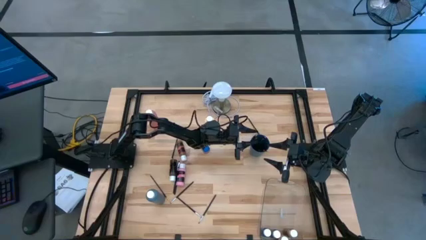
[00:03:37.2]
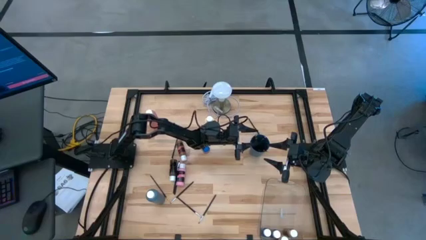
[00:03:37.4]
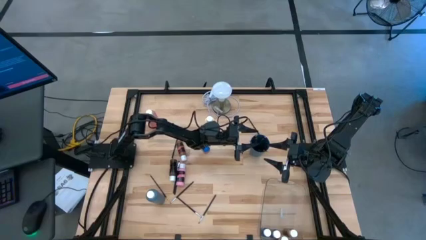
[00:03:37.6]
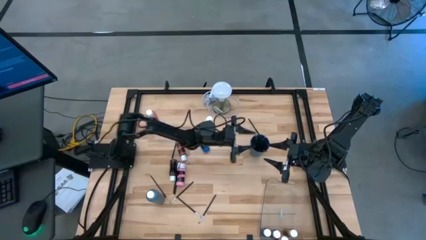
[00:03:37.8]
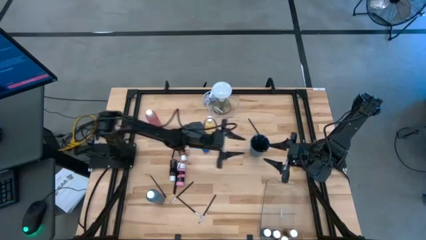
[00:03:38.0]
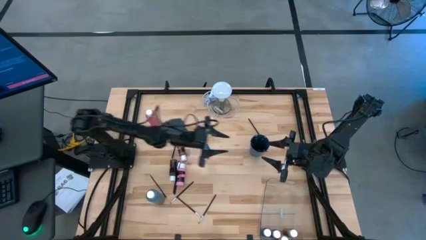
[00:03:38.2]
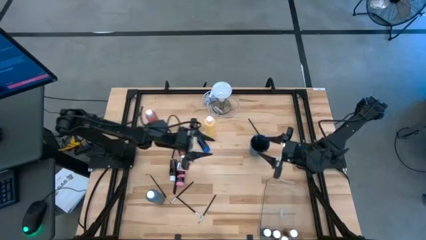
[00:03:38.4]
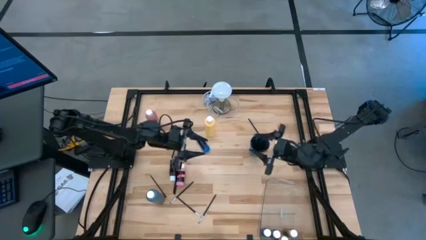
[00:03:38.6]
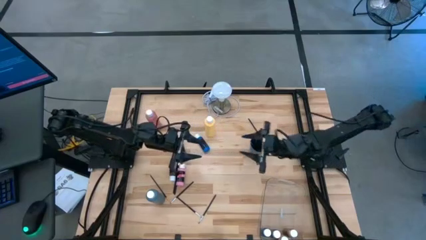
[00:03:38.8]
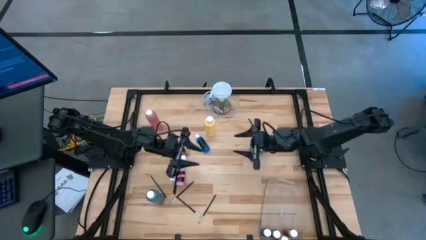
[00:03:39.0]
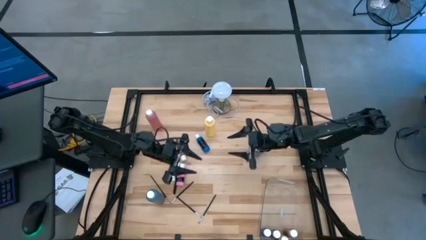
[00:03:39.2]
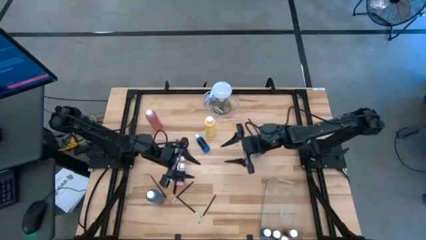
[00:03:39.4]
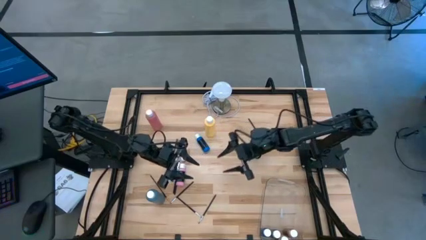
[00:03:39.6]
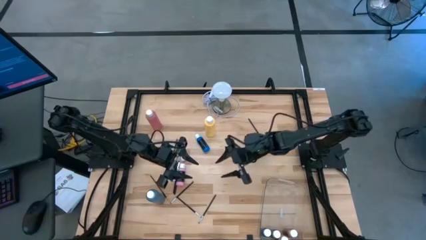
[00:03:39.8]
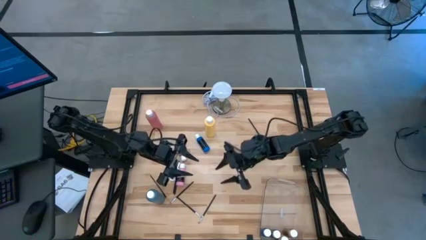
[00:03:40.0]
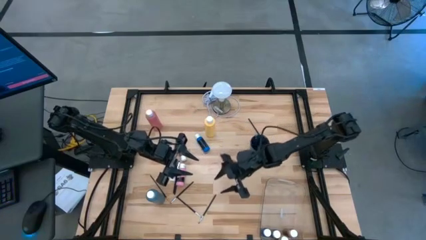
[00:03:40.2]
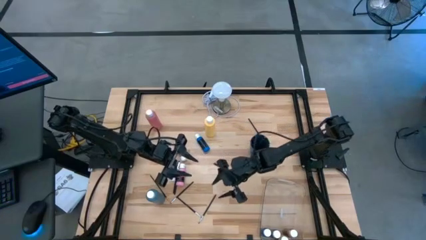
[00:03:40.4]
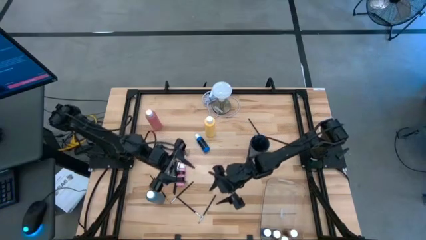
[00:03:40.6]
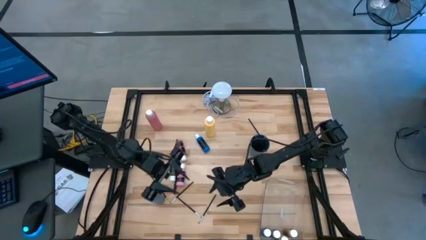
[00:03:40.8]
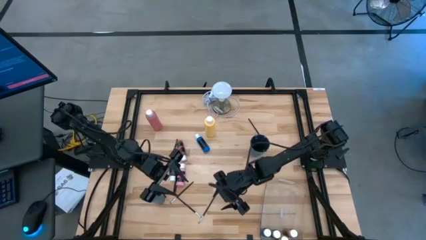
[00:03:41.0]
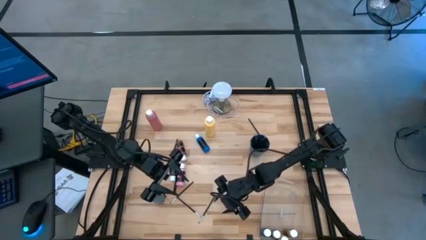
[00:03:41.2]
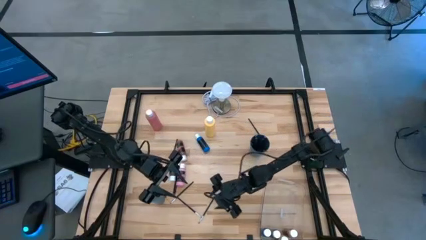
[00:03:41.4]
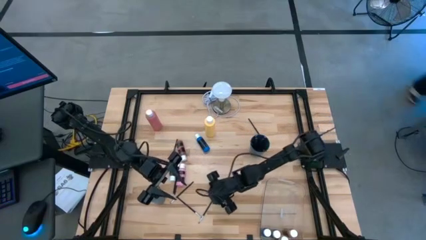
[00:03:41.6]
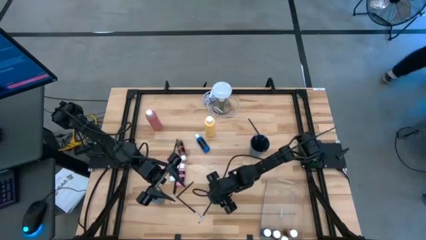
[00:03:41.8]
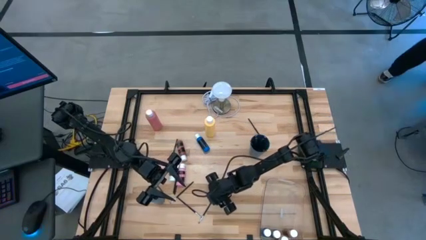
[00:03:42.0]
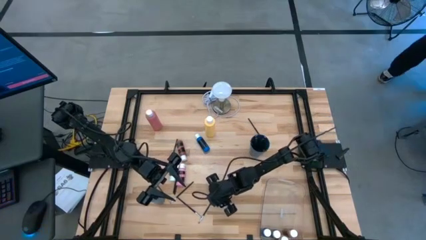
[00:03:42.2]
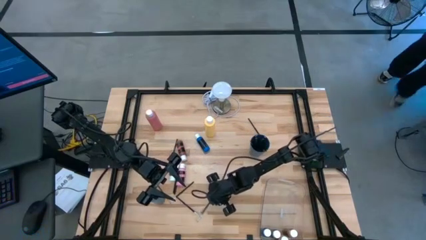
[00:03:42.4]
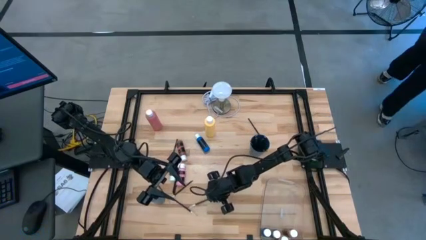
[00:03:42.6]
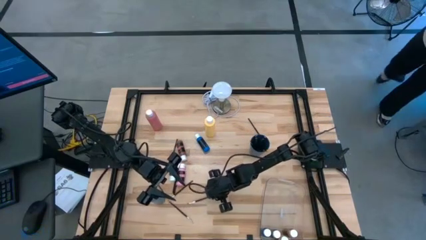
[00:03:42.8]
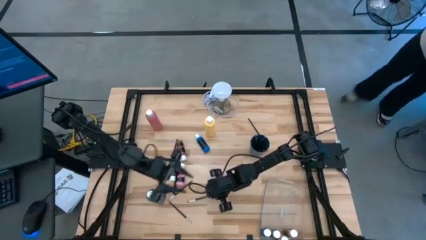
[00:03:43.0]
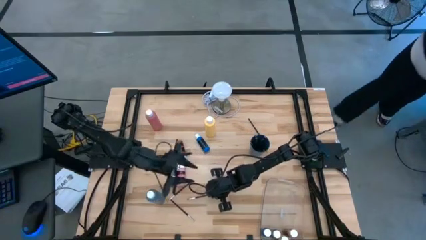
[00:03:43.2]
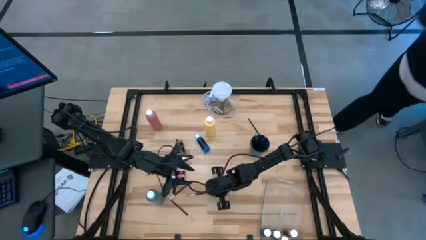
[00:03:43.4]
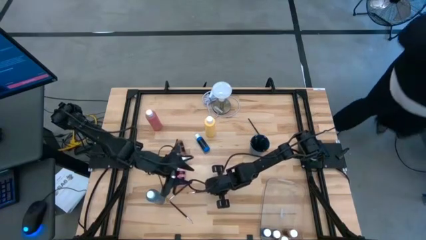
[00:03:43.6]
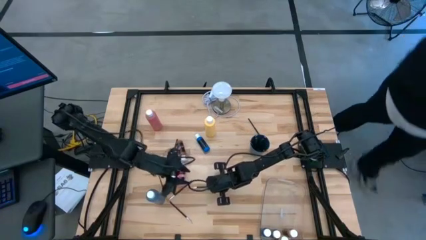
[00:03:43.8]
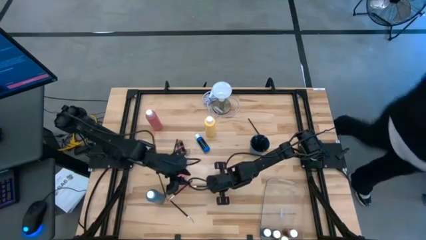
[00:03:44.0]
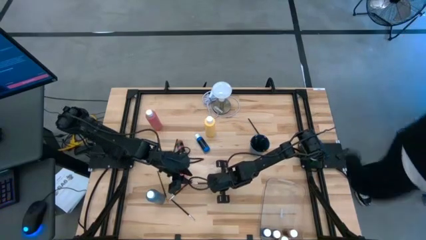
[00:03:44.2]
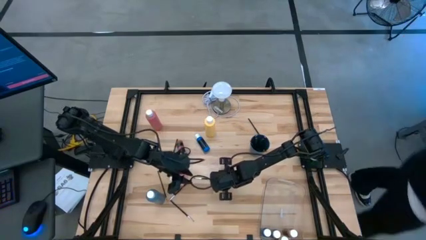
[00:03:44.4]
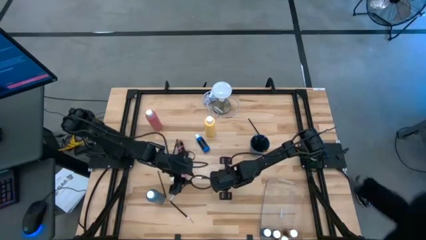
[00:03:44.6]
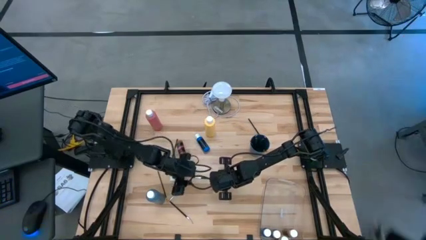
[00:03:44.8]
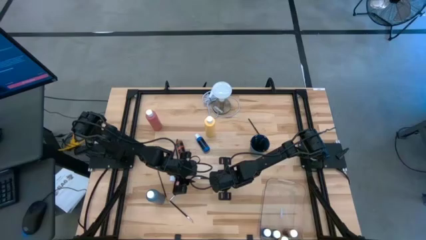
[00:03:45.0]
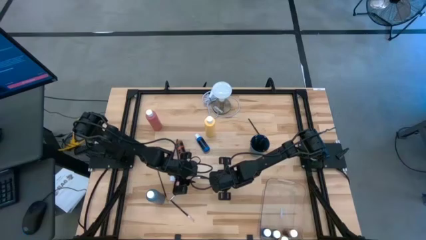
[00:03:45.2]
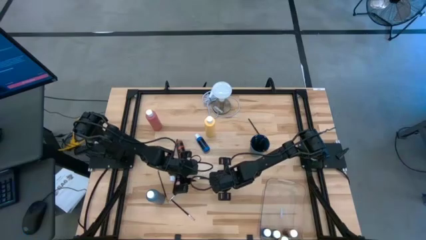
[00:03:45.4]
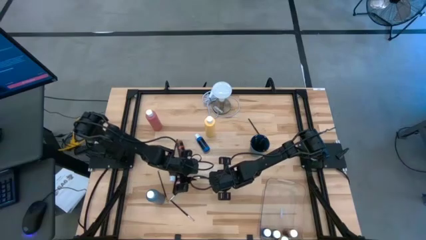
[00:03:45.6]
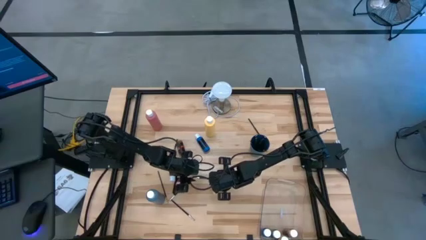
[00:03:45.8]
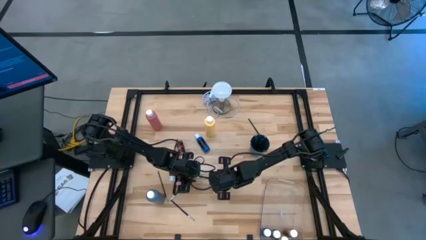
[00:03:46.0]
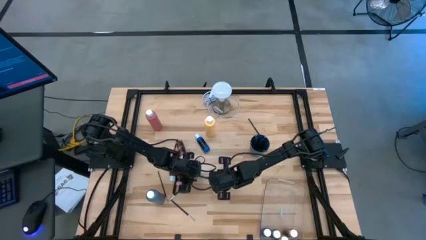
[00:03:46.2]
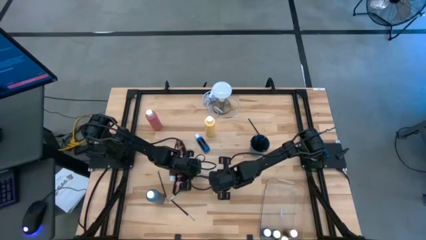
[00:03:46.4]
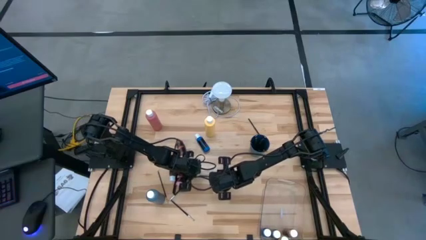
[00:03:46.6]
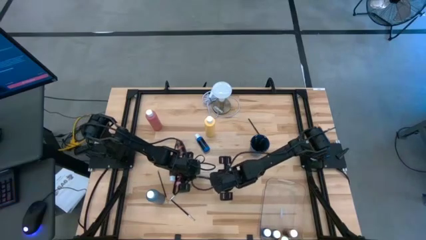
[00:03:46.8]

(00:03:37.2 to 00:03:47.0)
Task: Pick & Place Paint Supplies
Put the black silver paintbrush into the blue cup

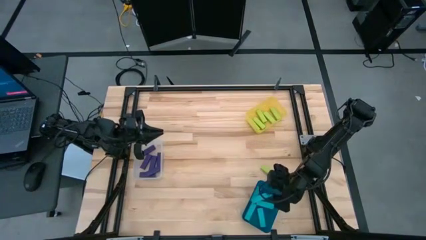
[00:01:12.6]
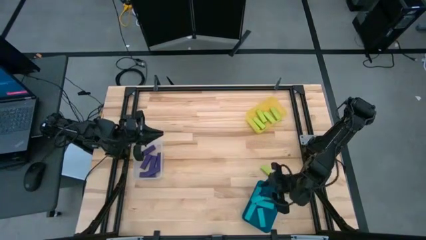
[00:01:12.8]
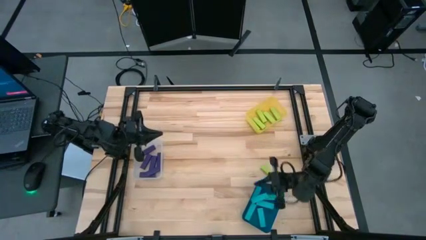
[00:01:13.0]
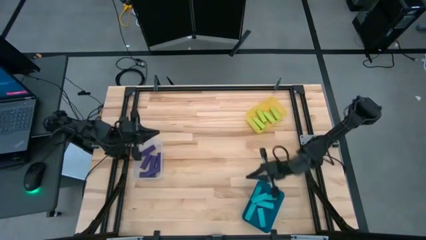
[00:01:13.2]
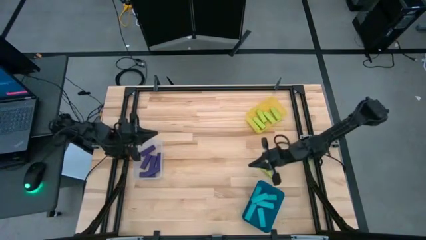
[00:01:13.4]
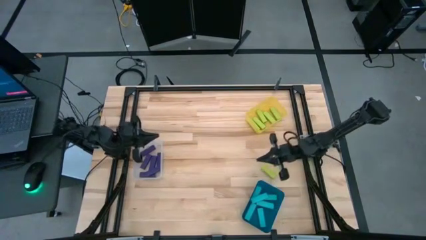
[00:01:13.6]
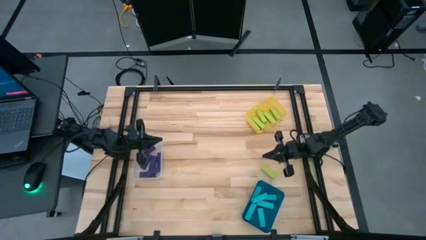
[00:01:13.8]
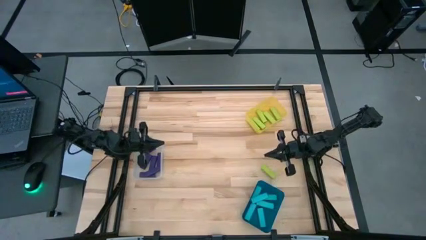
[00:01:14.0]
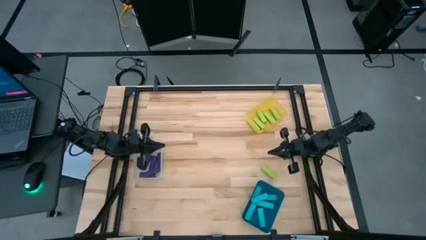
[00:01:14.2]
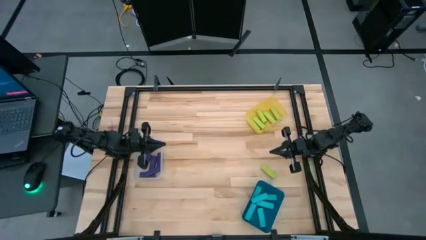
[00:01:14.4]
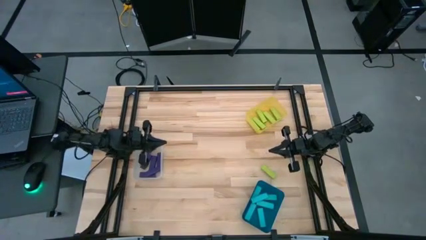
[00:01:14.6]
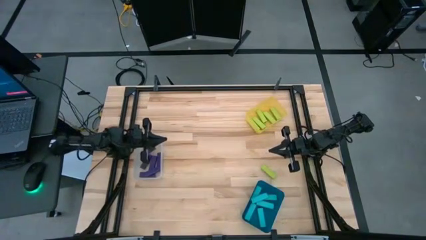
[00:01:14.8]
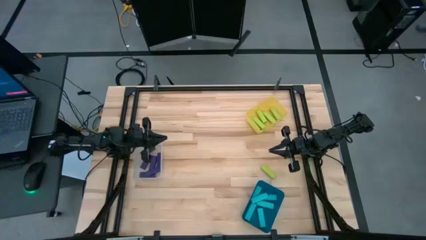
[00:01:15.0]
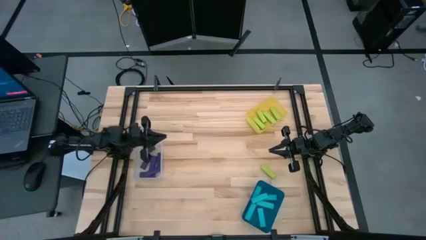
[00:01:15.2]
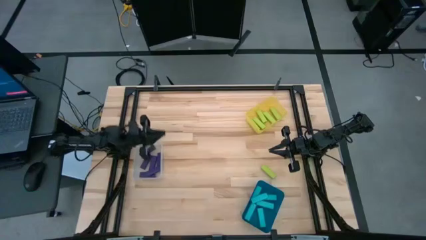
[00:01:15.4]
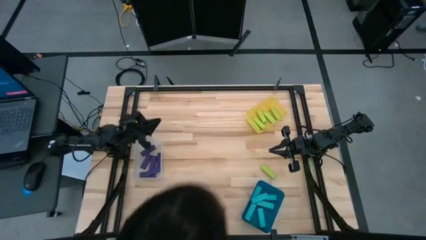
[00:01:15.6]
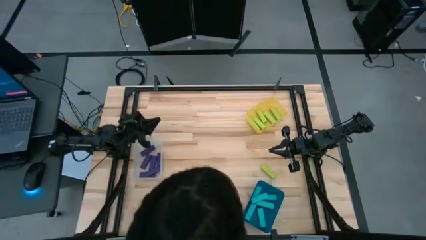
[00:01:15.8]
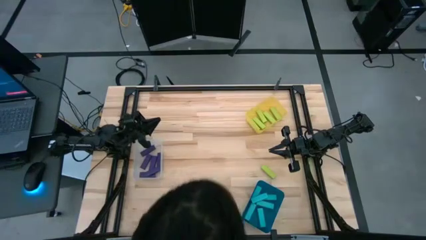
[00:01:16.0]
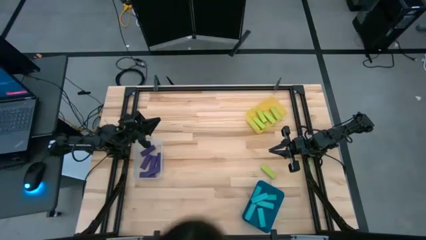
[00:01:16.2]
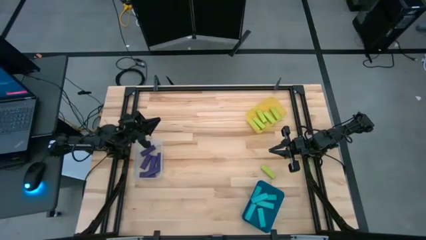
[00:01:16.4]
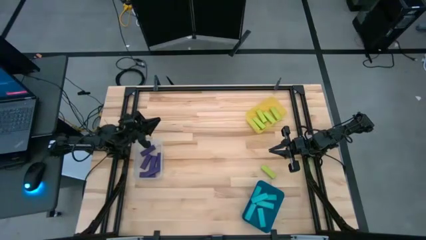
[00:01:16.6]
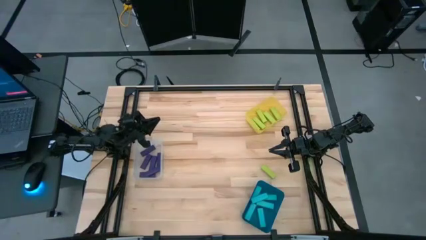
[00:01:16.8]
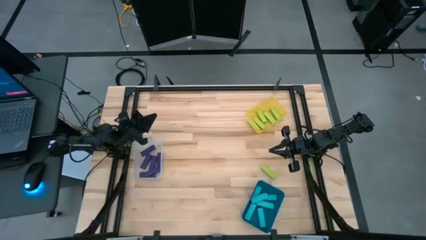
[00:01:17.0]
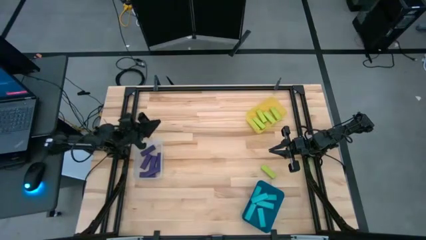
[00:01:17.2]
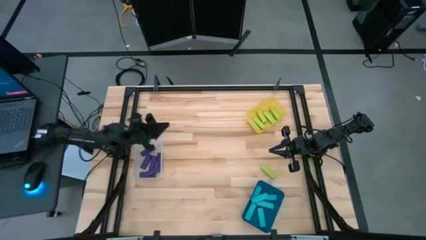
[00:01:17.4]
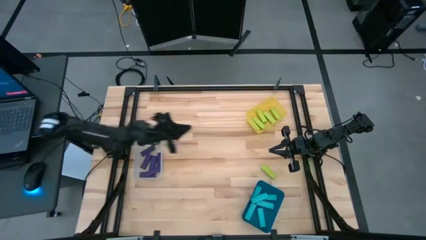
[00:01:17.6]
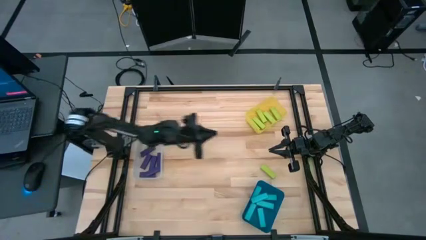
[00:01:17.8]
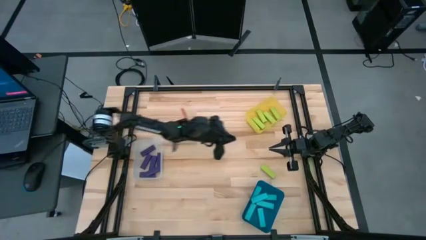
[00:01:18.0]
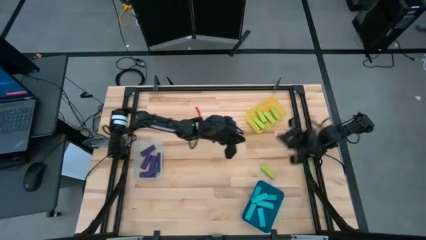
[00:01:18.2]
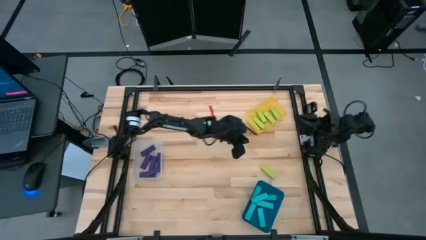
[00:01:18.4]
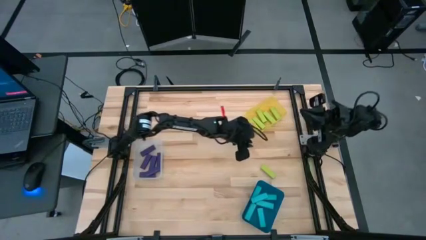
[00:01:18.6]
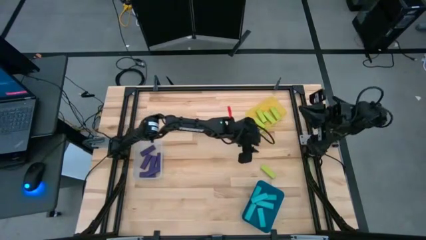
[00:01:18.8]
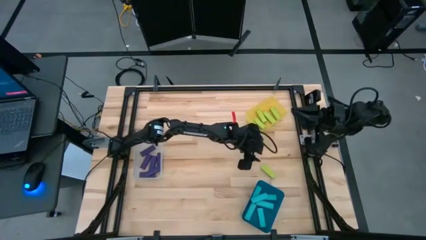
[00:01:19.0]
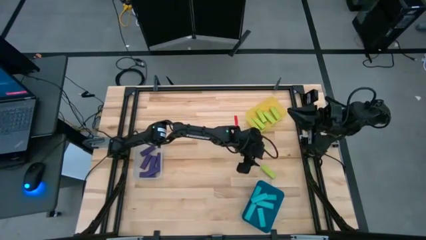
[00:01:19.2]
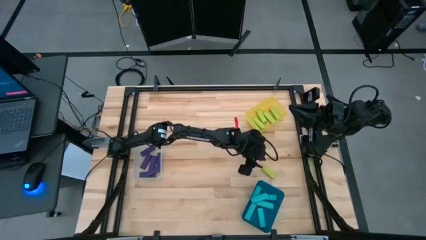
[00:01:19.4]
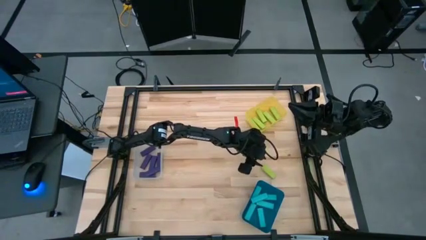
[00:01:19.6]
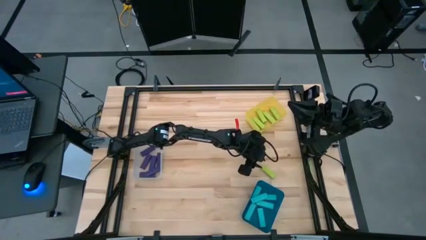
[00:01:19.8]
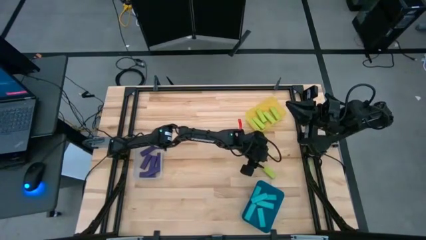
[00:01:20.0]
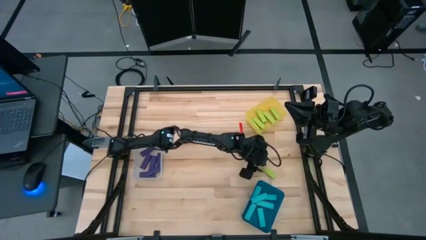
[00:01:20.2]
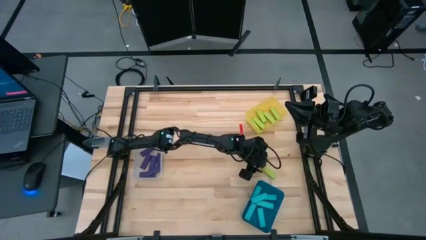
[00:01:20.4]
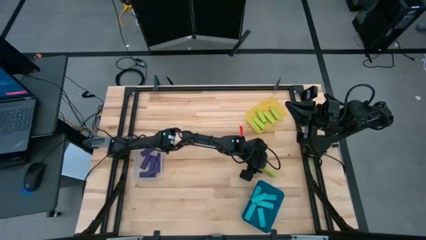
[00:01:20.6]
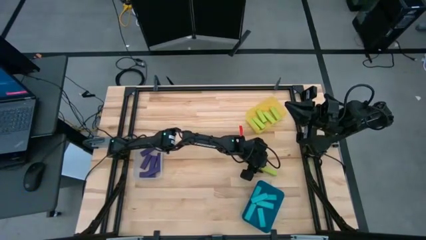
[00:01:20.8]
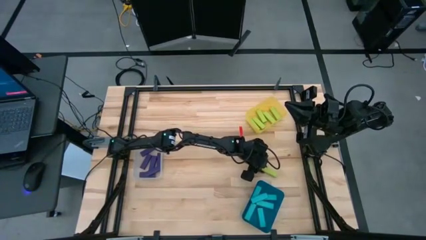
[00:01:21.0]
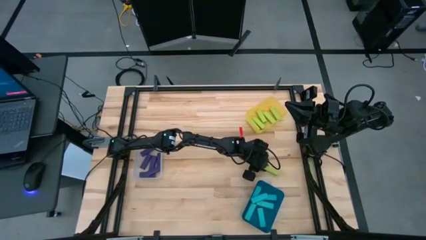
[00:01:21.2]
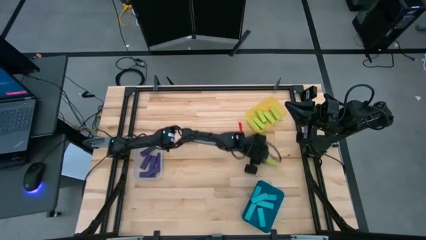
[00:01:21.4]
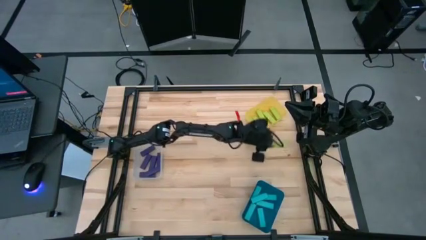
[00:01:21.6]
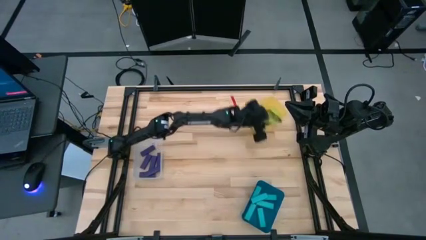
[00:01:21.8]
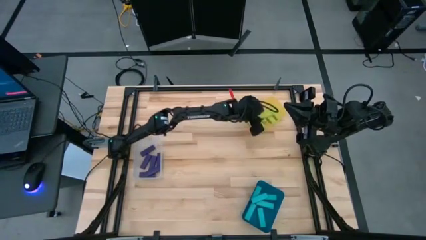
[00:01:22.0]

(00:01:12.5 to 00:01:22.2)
Task: Sort blocks
Put the green block into the yellow bin
